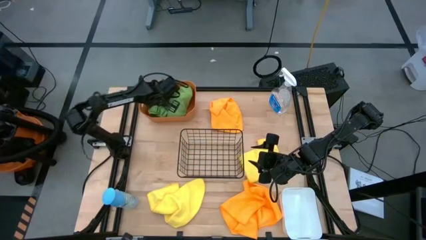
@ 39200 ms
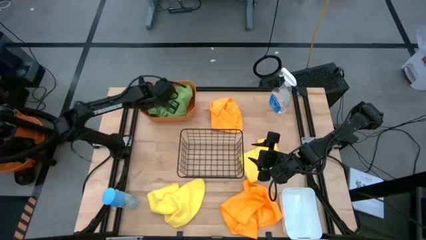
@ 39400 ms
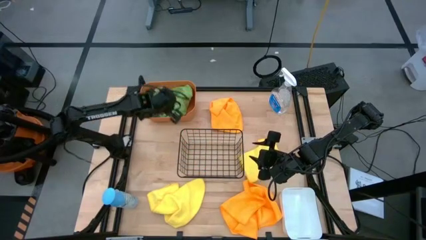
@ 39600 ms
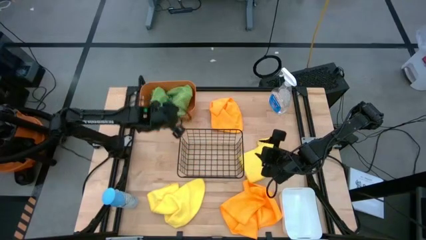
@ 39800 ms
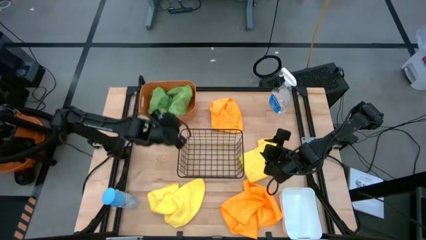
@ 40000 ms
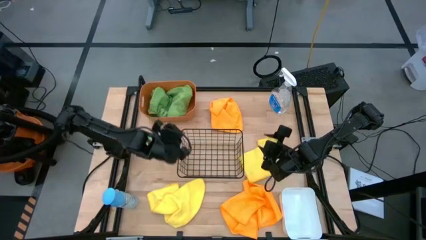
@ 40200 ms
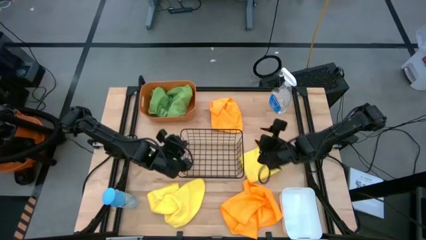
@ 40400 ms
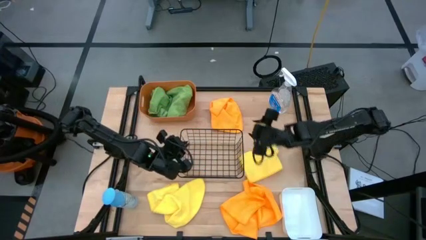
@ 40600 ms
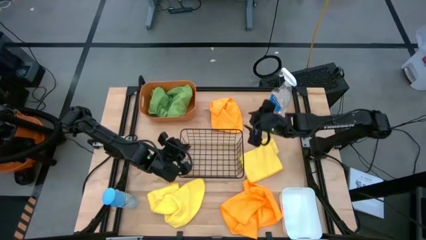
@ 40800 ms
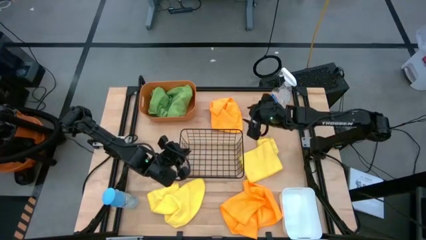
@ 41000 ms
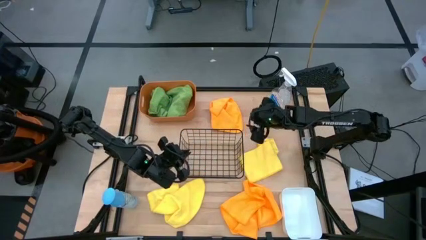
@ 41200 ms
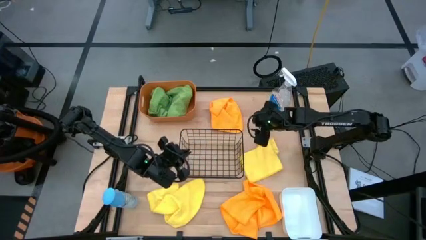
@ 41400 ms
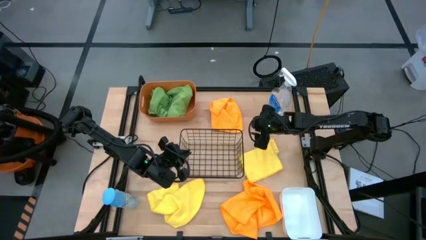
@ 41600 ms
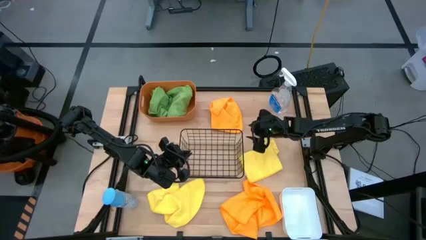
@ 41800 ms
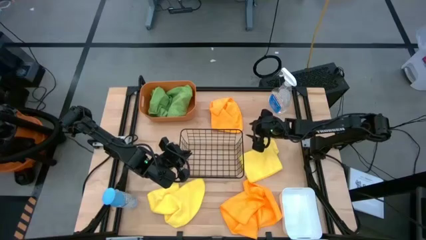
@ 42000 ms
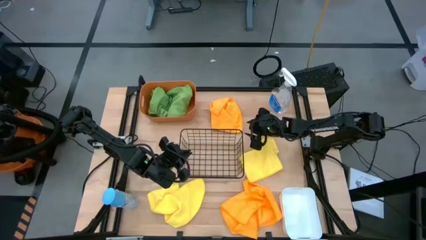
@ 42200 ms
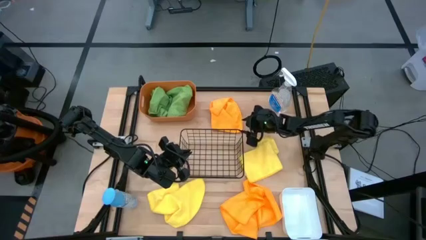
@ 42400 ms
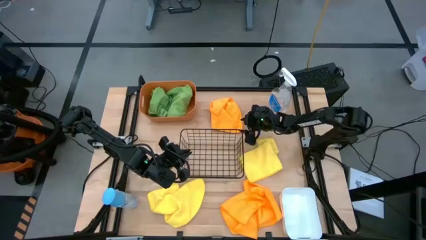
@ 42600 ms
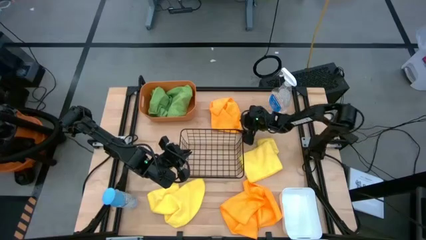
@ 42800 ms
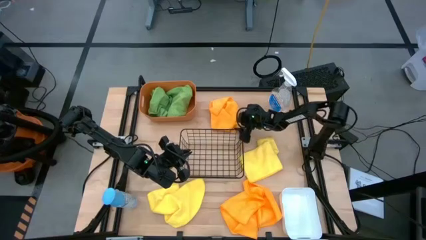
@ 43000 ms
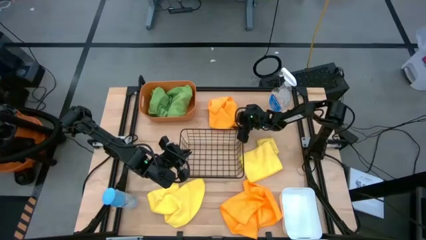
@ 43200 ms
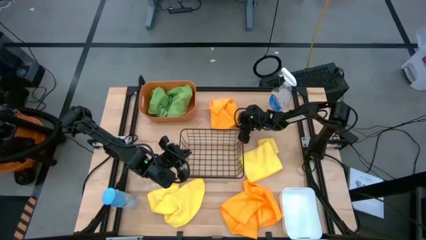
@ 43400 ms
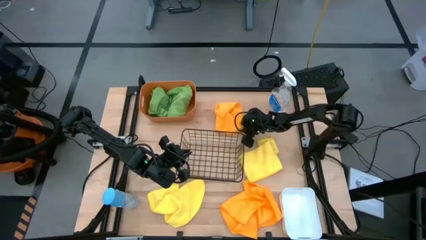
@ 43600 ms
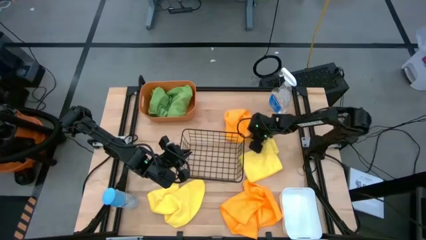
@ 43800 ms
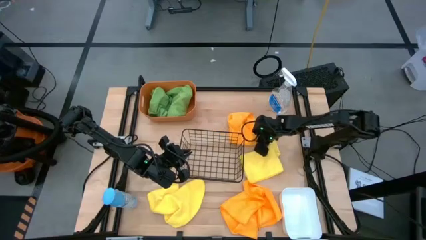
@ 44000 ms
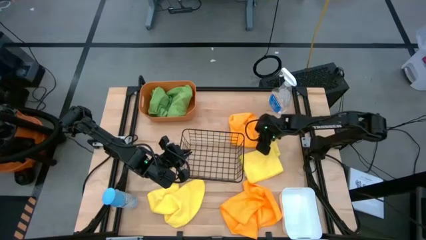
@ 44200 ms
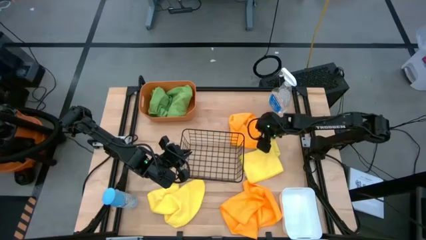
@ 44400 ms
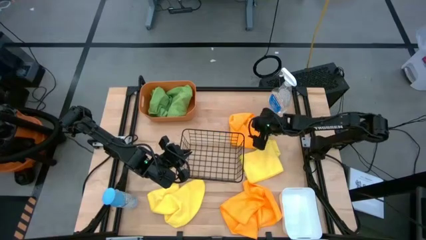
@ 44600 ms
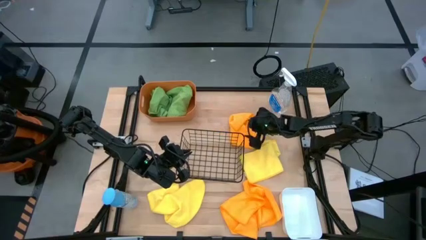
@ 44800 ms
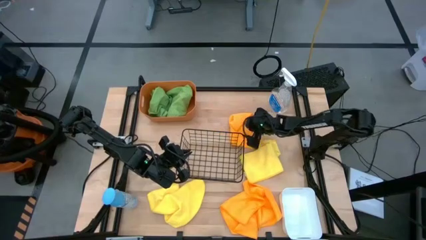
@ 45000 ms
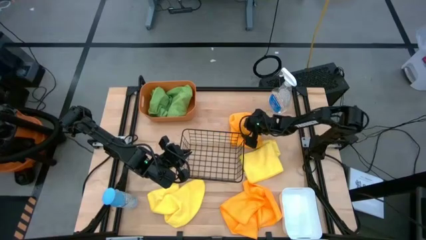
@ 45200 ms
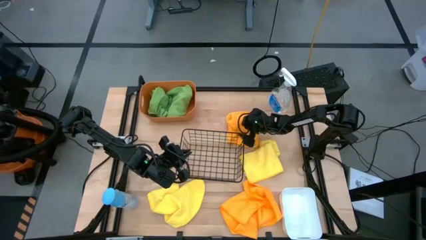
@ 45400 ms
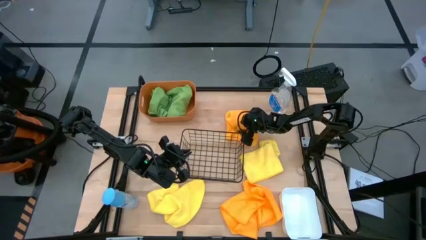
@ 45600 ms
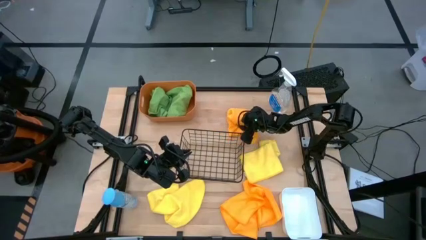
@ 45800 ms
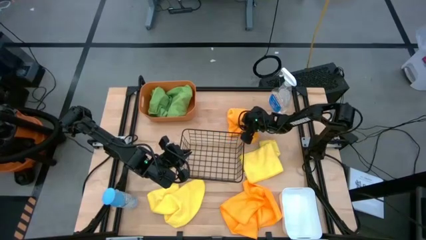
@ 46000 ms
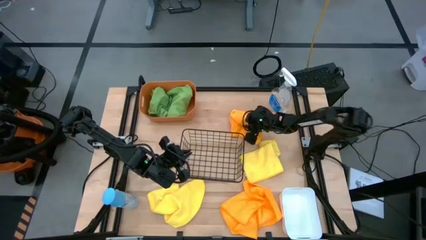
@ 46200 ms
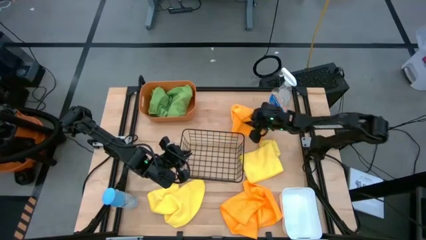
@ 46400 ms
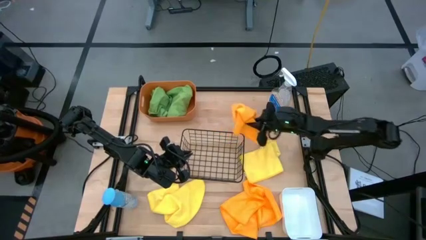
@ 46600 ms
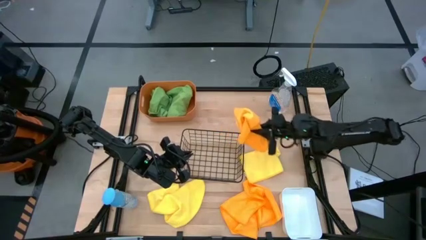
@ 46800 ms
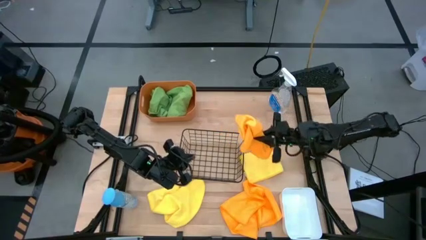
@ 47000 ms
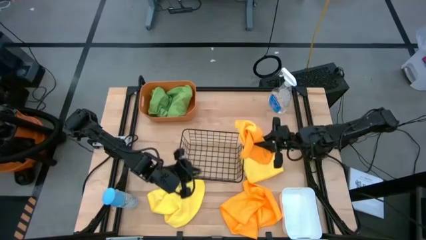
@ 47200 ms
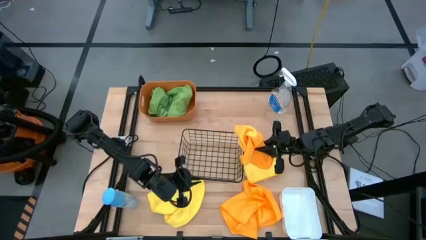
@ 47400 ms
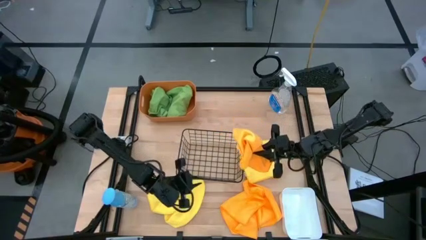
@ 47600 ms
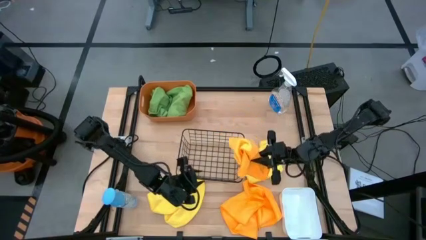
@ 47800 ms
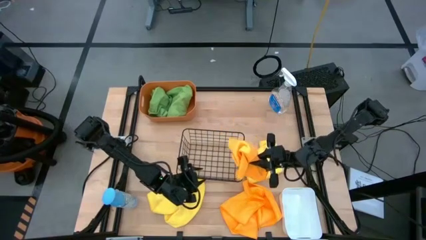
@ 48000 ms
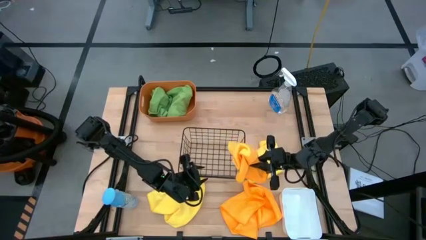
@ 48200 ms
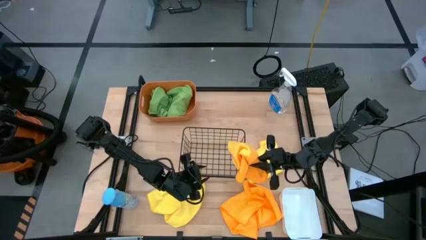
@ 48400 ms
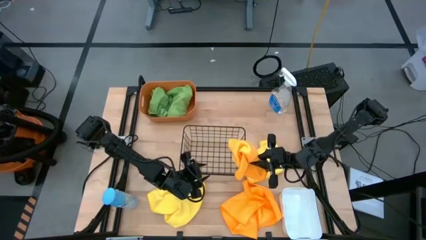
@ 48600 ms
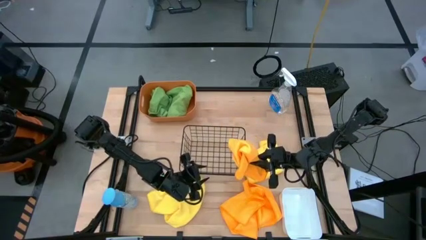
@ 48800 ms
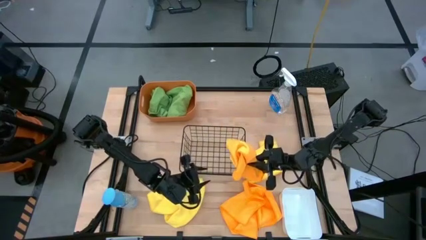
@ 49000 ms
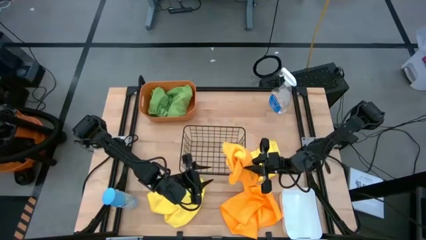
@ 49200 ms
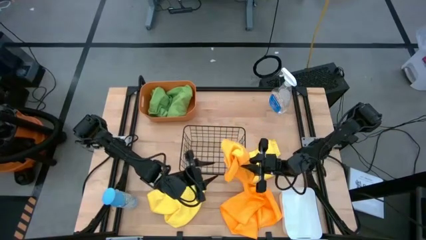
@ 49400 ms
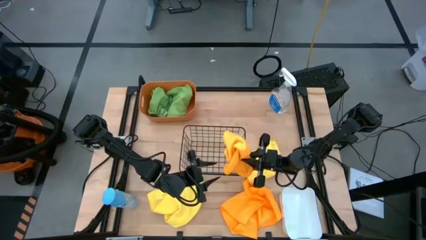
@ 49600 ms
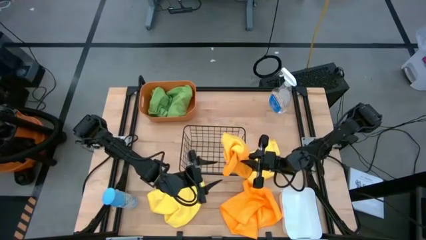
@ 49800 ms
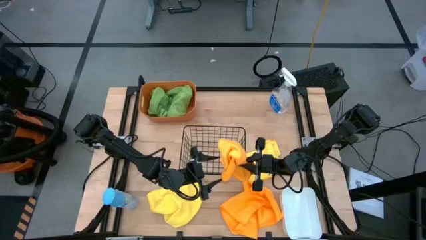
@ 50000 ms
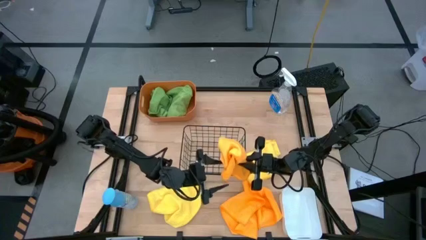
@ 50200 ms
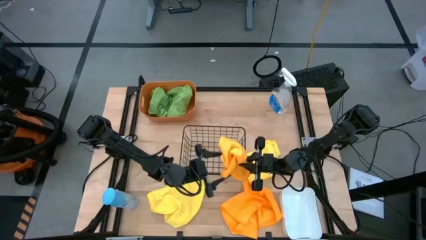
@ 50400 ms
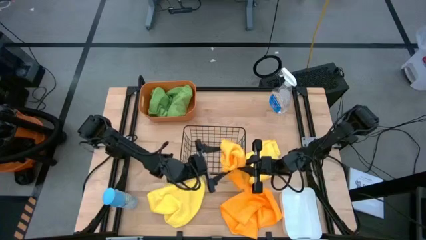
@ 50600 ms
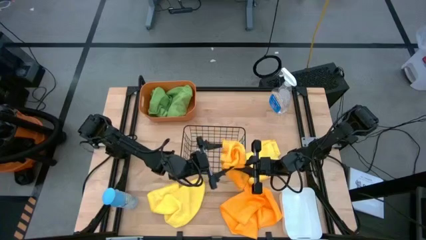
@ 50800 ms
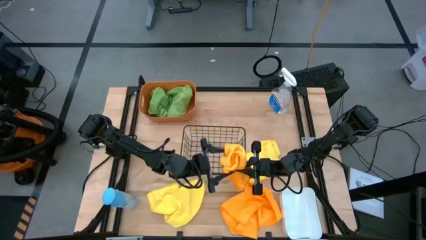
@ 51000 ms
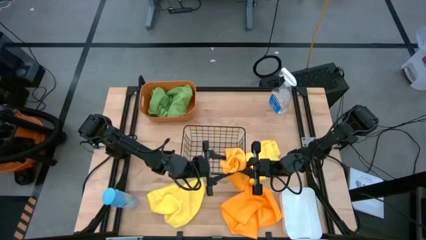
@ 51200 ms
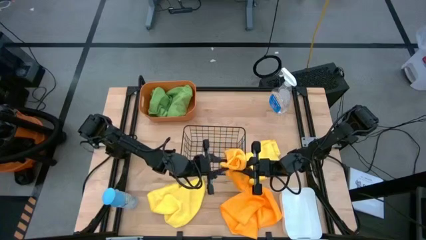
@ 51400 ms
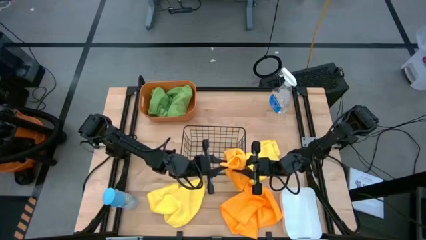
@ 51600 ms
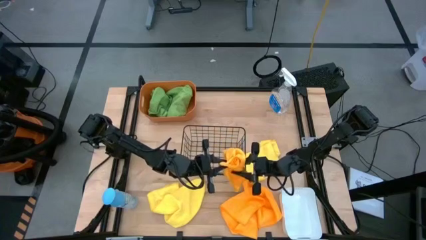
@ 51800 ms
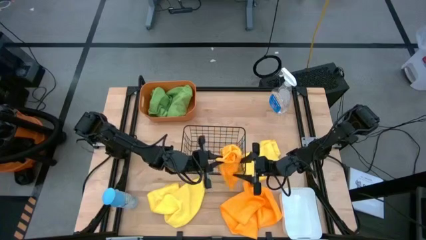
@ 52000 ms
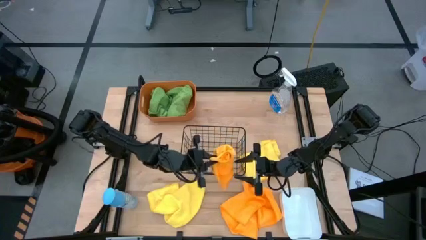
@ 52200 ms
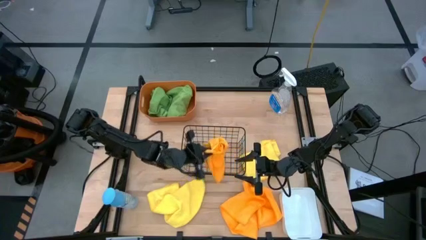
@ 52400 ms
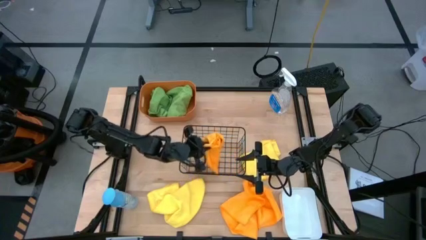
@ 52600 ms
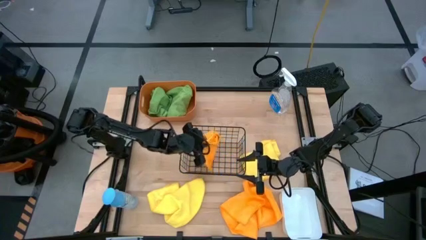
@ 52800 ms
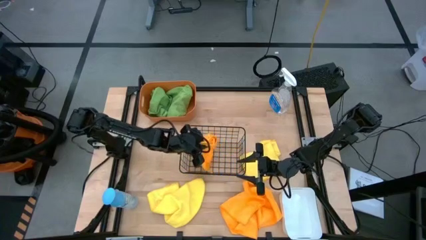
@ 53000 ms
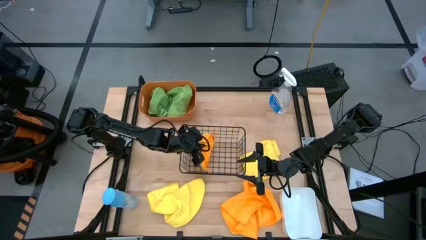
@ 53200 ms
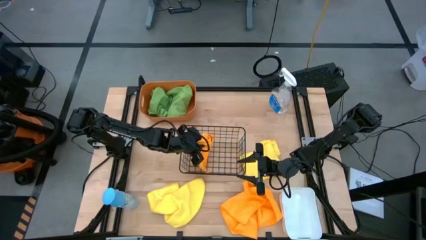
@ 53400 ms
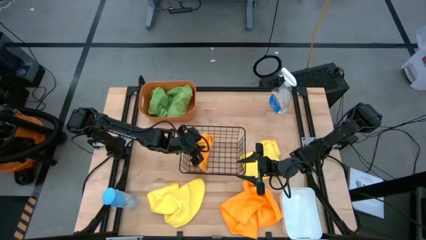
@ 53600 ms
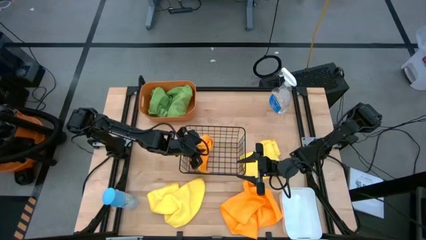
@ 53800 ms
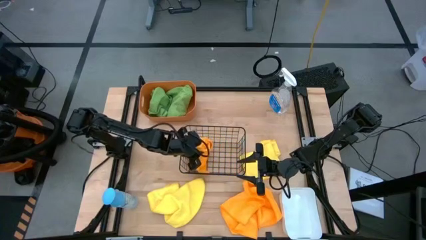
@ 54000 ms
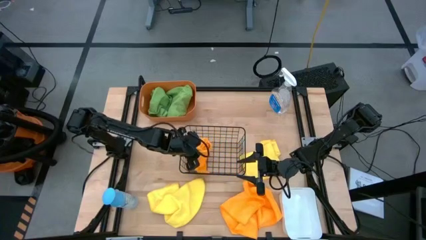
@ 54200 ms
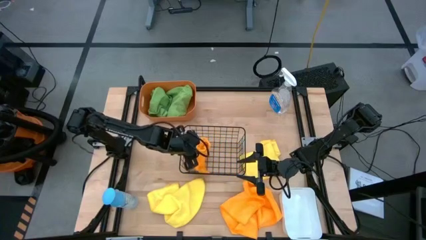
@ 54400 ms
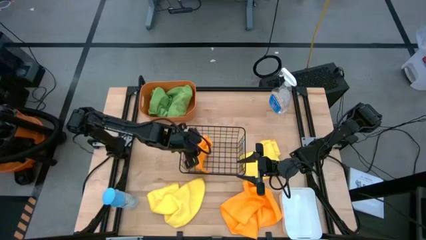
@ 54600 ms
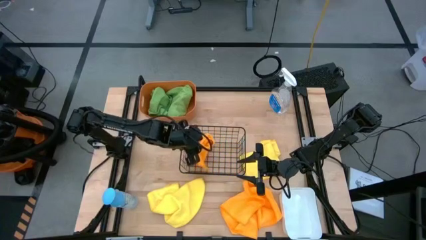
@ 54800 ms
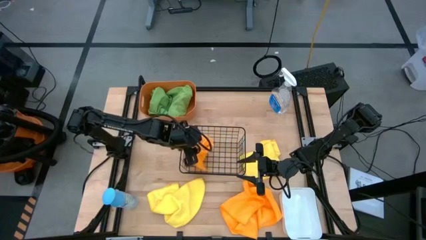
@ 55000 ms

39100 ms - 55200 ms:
Task: Sort microfiber towel by color & place in baskets
Put the top orange microfiber cloth into the black wire basket
